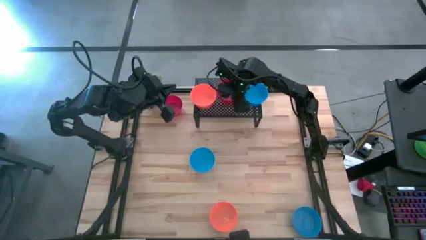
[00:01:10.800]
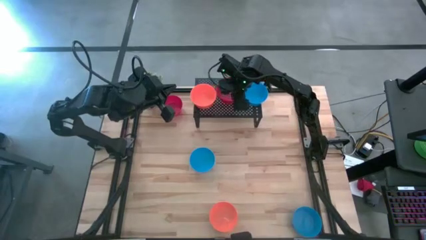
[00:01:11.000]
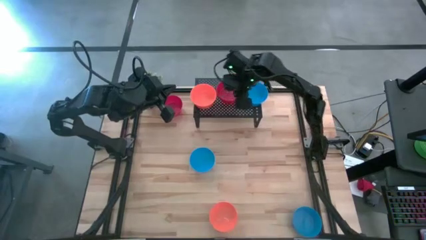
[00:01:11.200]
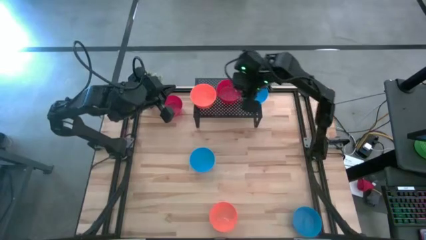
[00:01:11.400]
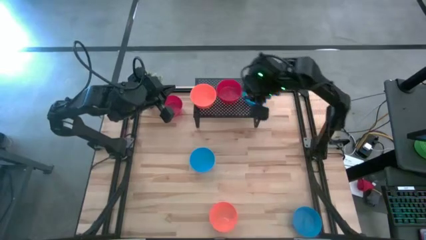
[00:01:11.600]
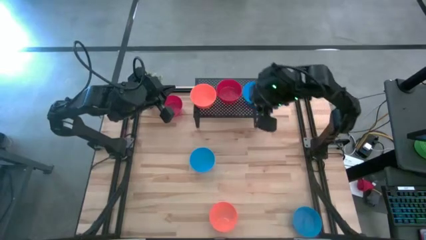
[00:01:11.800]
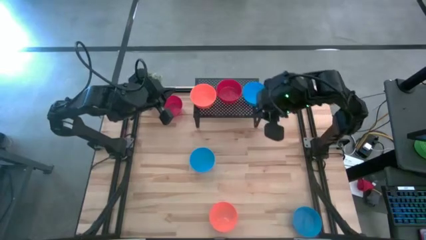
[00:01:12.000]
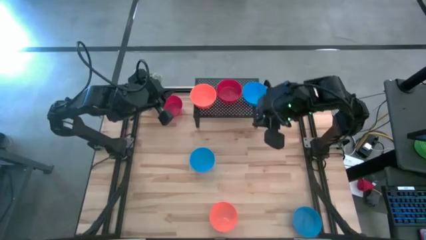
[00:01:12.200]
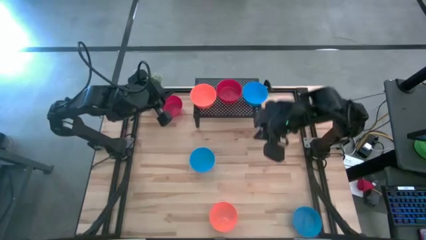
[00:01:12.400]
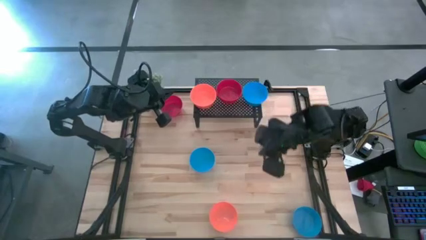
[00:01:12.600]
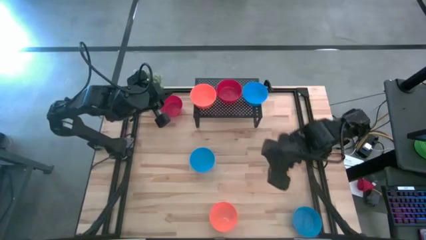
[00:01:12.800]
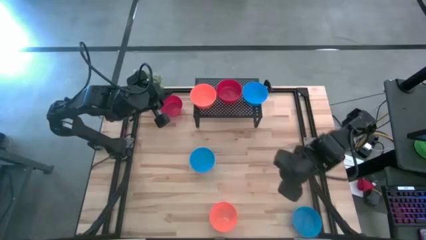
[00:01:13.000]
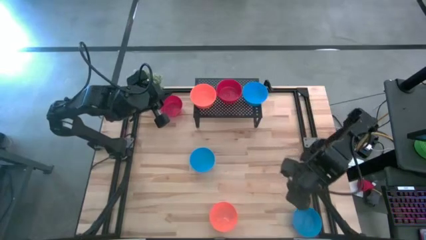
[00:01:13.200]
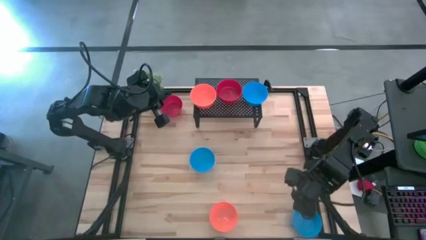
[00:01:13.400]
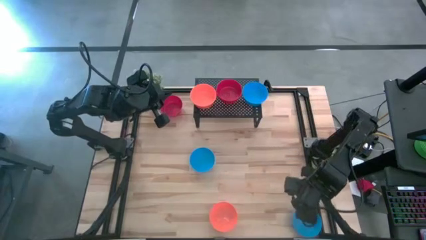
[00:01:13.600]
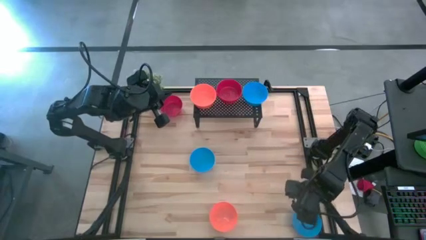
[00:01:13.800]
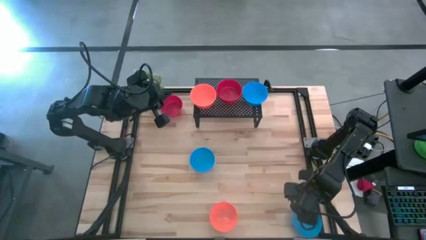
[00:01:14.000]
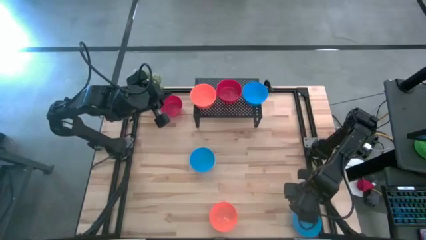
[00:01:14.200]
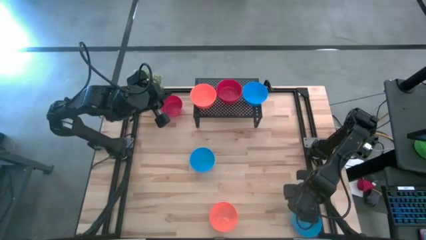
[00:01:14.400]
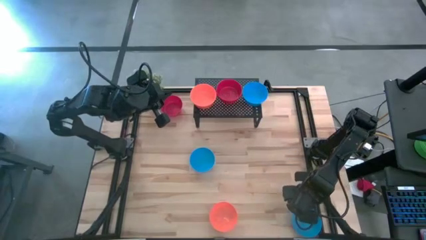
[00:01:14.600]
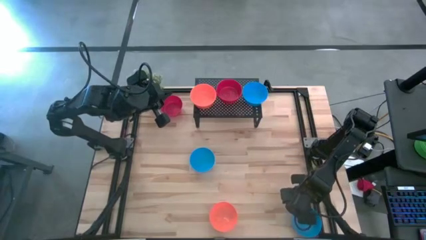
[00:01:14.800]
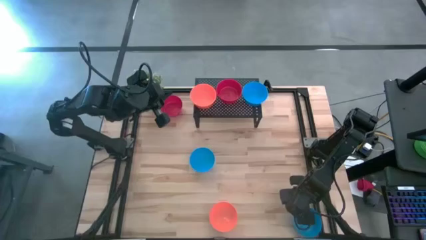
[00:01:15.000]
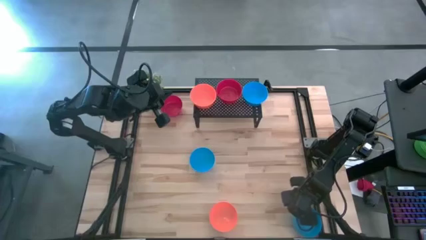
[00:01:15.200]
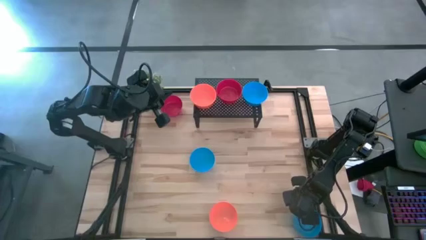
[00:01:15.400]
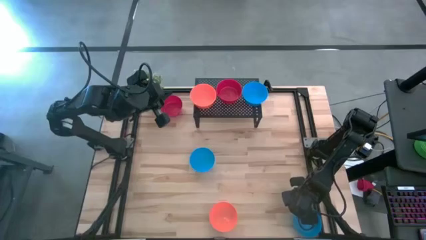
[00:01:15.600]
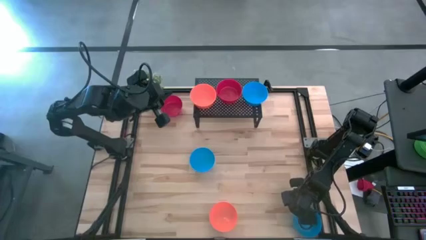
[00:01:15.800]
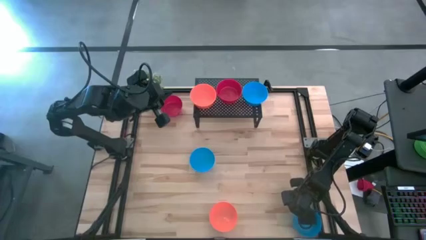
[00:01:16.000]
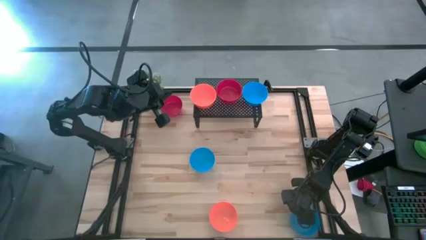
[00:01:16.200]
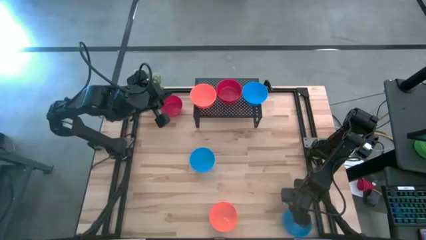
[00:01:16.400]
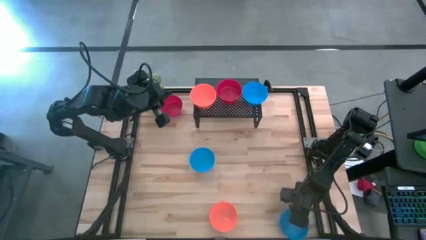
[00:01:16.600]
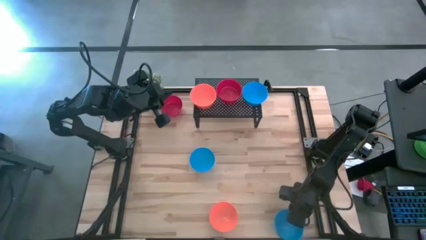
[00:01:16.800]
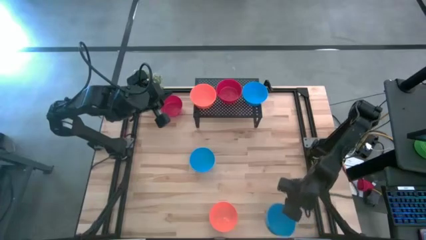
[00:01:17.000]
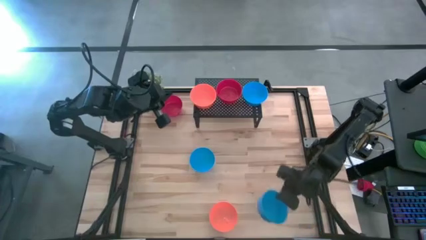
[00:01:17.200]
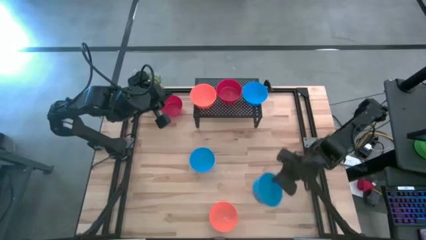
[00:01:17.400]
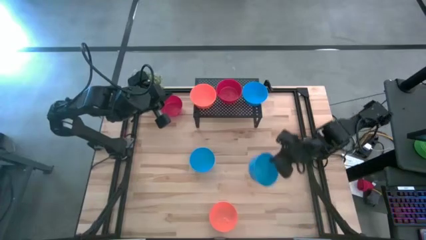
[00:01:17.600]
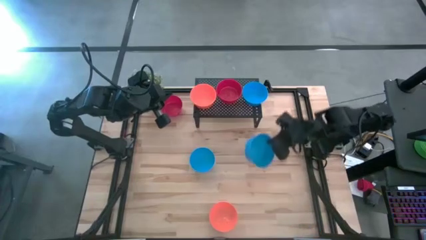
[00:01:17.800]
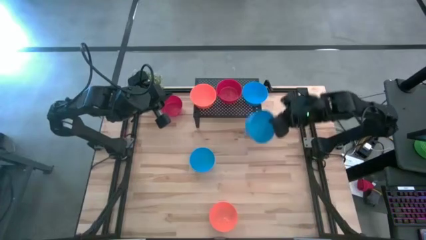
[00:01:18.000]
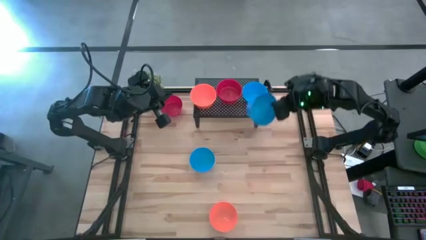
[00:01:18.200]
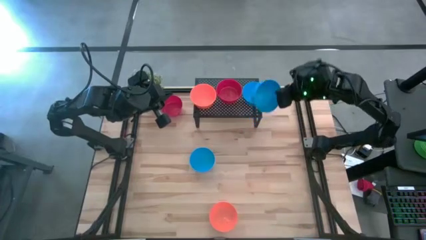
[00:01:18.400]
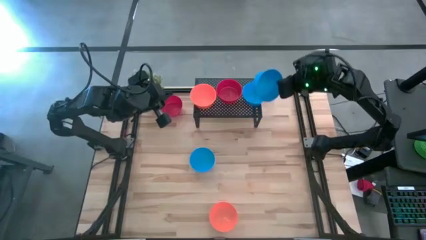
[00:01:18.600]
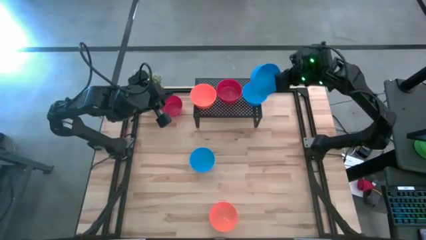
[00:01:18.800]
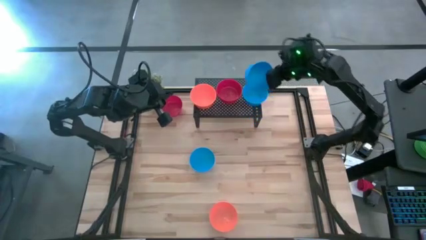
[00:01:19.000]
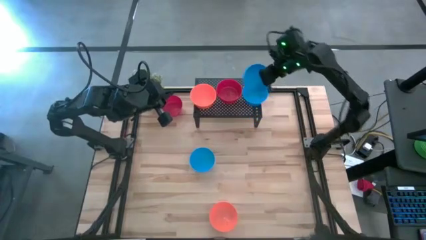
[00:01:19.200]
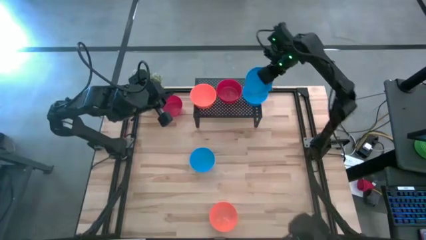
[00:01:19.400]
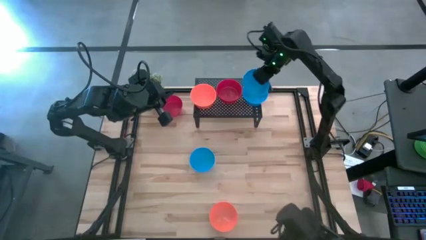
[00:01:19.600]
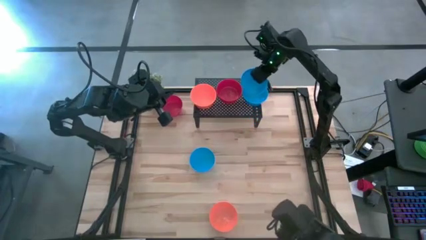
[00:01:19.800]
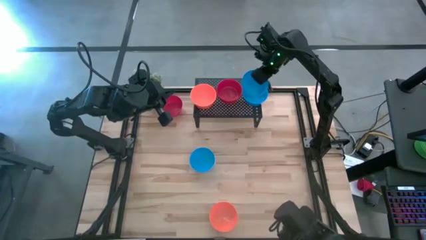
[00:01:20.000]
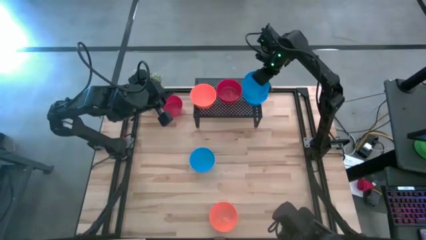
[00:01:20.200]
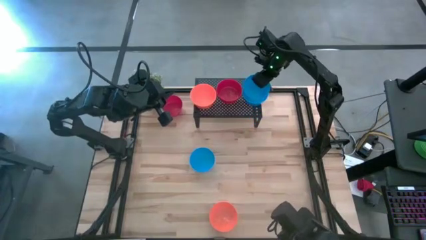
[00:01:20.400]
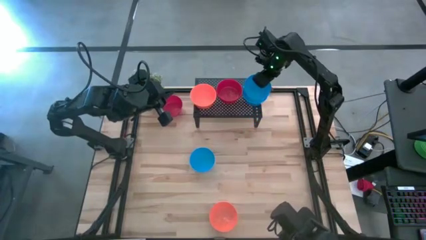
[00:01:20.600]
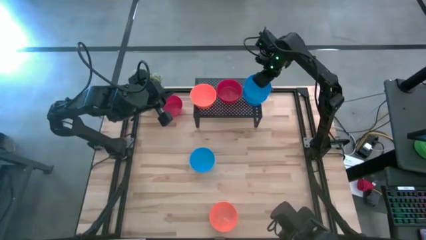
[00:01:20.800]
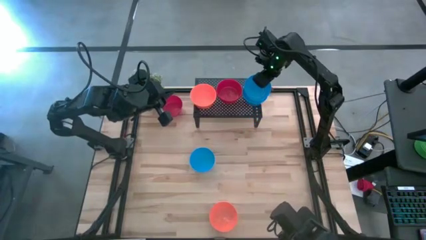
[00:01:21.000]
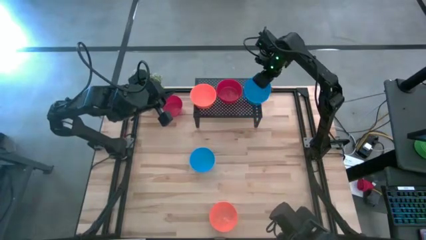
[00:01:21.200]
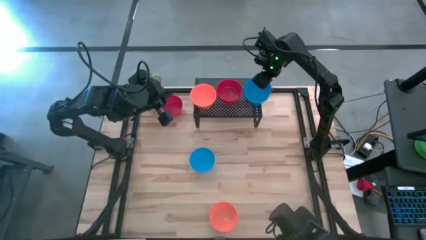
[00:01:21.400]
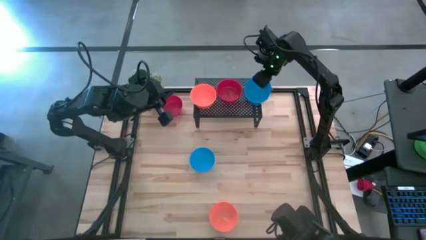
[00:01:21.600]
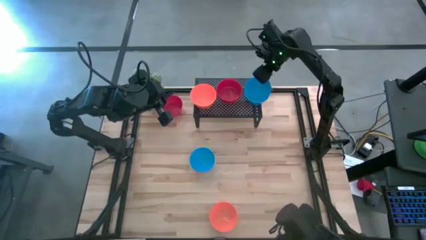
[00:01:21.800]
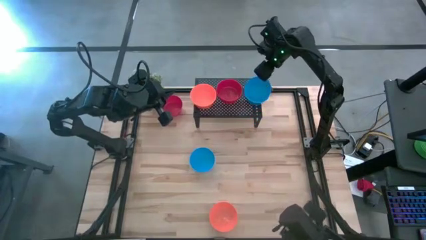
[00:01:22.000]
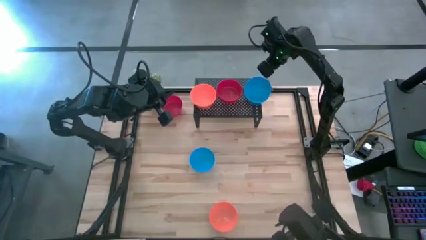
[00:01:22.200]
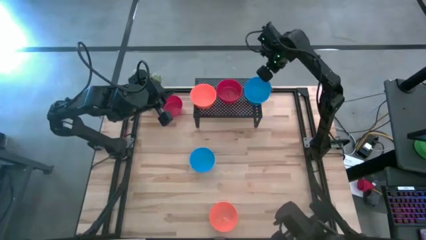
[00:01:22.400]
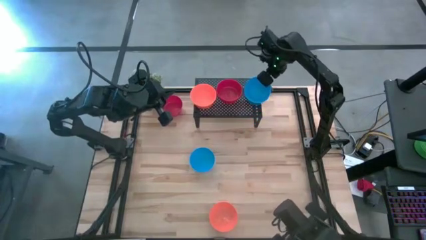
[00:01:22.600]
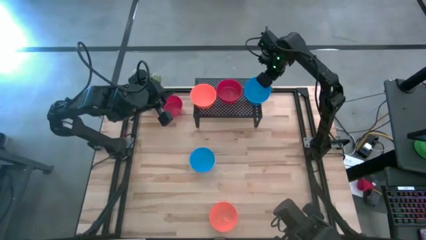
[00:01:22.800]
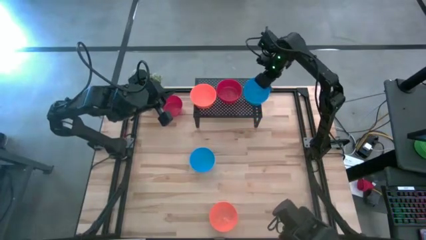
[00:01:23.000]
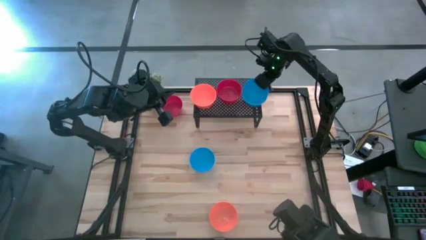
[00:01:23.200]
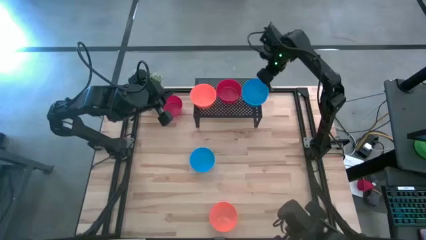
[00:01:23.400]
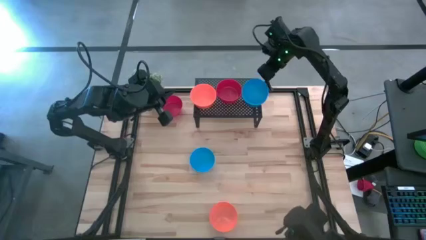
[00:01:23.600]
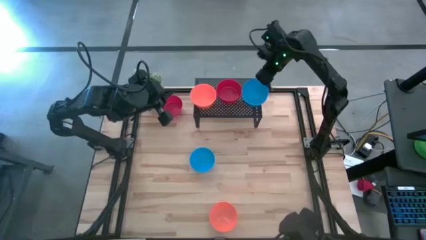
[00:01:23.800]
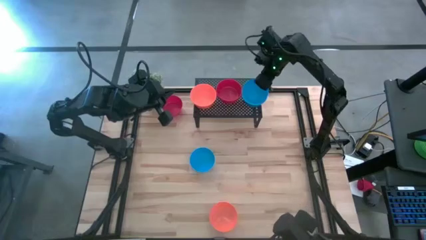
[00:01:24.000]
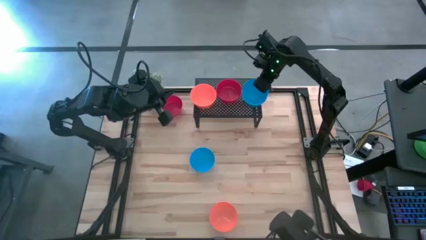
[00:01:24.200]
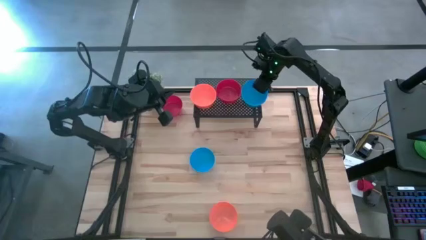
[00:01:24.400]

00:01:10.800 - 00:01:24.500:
Task: Pick & Place Mini bowls
Stack the bottom blue bowl on top of the blue bowl on the shelf
